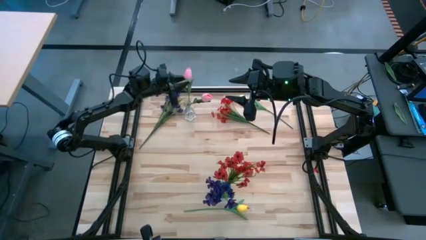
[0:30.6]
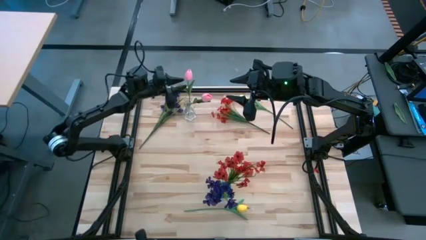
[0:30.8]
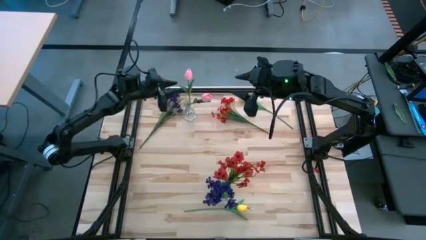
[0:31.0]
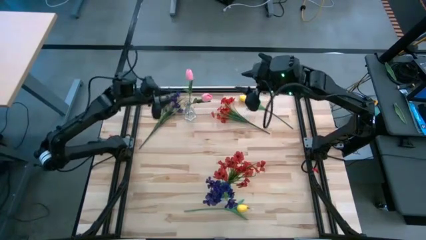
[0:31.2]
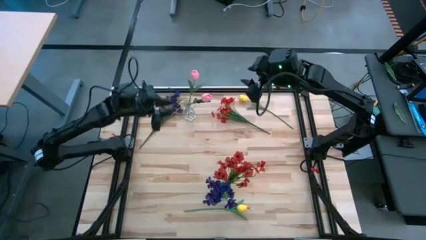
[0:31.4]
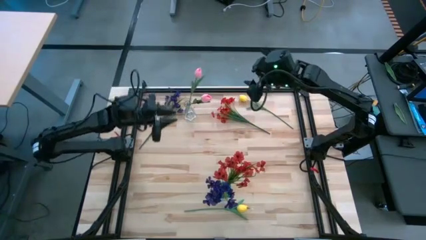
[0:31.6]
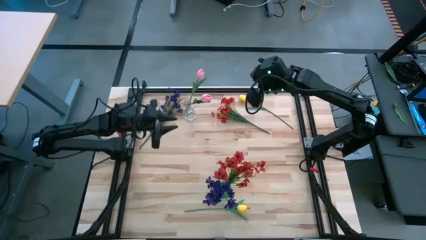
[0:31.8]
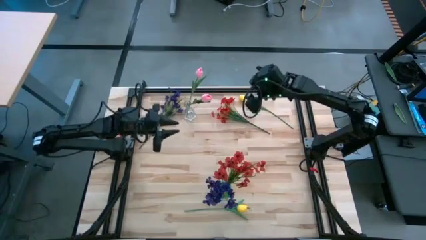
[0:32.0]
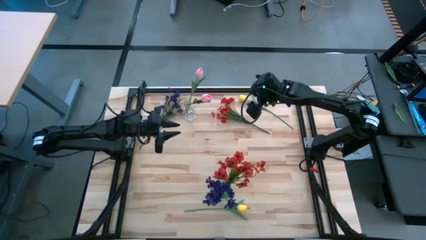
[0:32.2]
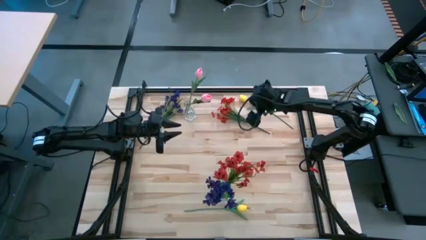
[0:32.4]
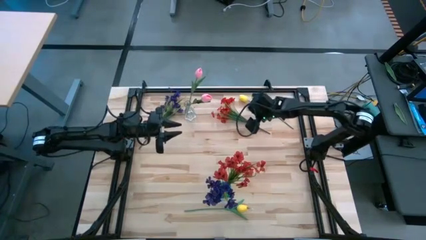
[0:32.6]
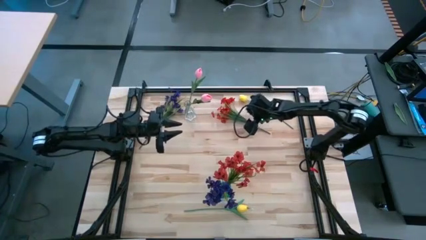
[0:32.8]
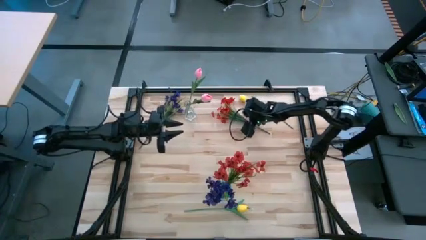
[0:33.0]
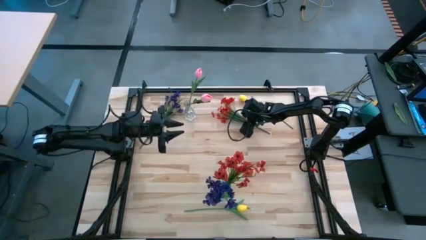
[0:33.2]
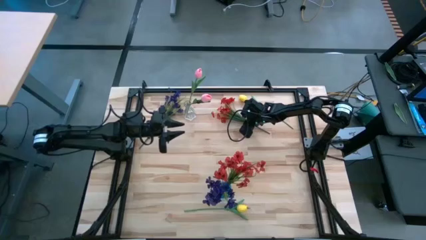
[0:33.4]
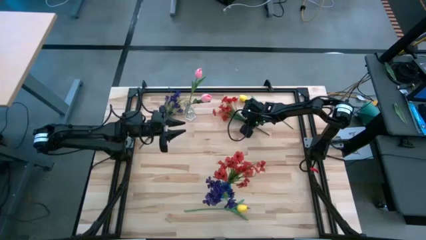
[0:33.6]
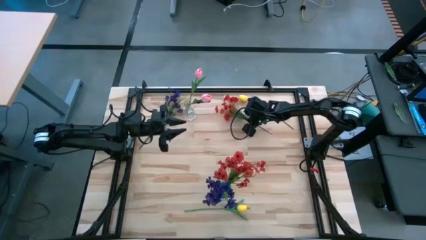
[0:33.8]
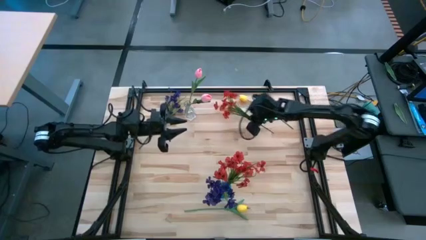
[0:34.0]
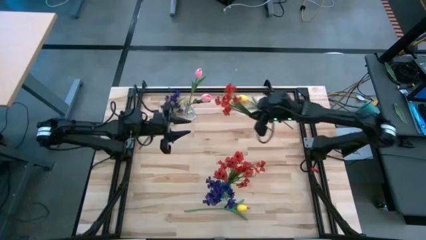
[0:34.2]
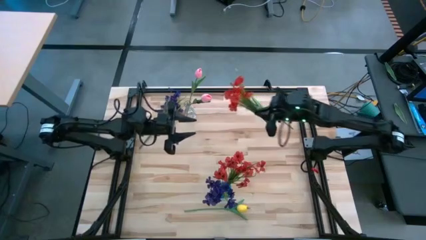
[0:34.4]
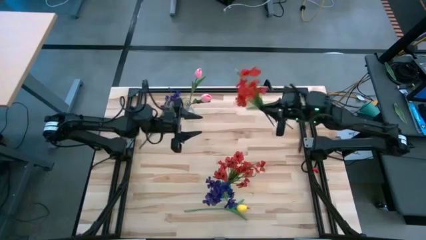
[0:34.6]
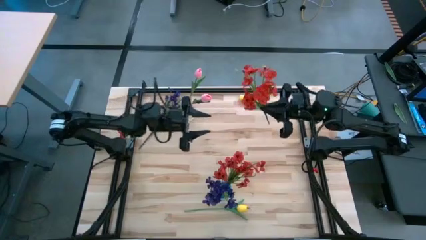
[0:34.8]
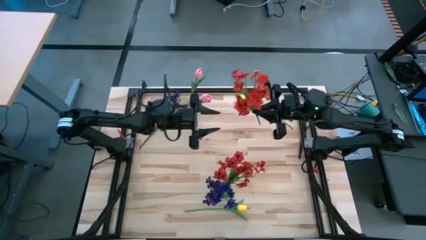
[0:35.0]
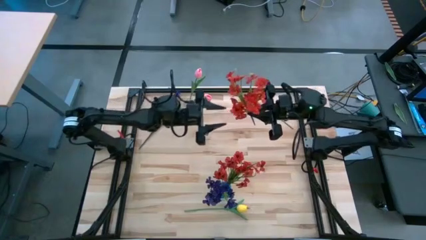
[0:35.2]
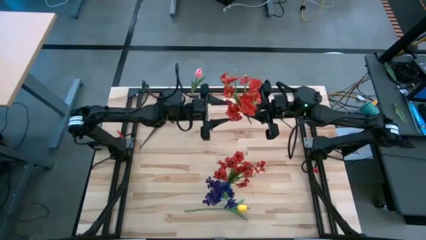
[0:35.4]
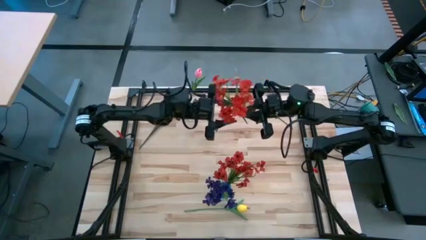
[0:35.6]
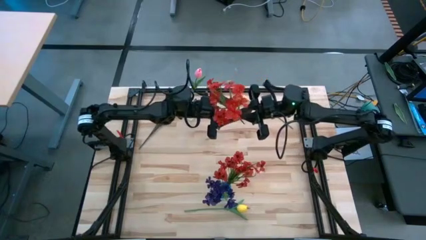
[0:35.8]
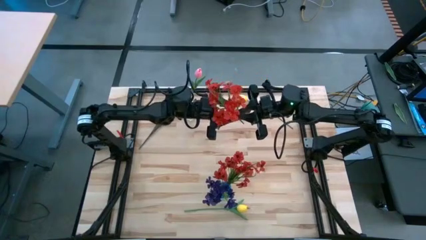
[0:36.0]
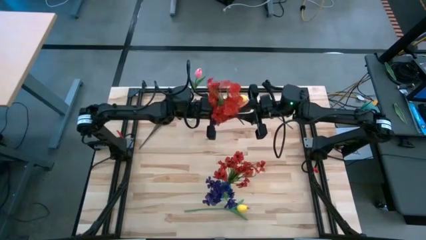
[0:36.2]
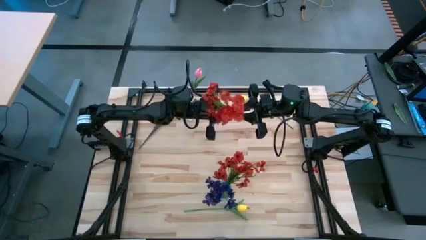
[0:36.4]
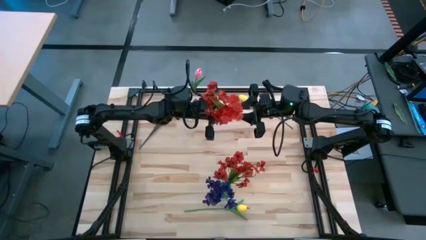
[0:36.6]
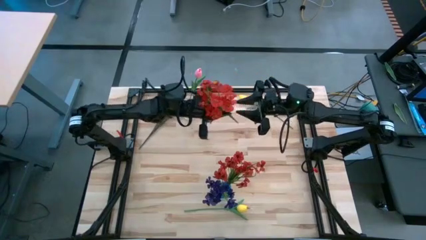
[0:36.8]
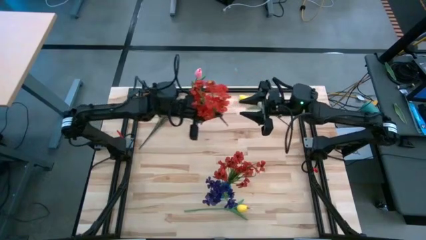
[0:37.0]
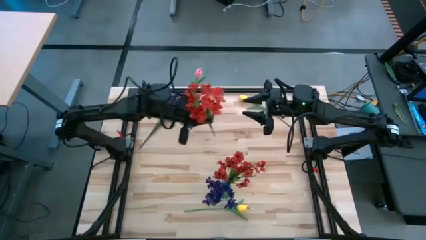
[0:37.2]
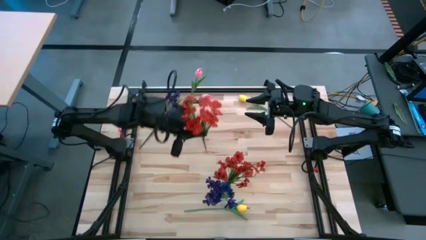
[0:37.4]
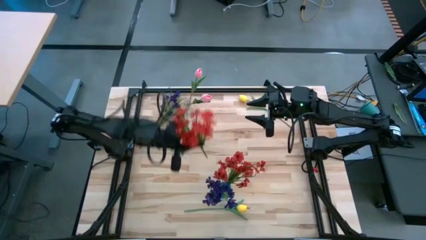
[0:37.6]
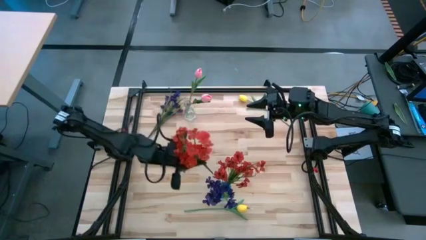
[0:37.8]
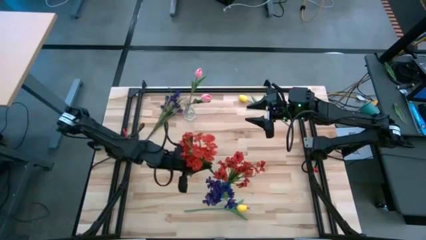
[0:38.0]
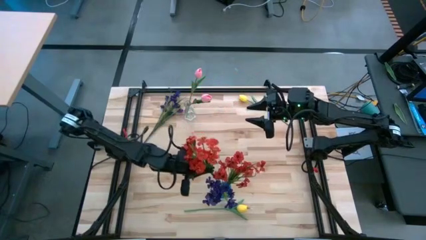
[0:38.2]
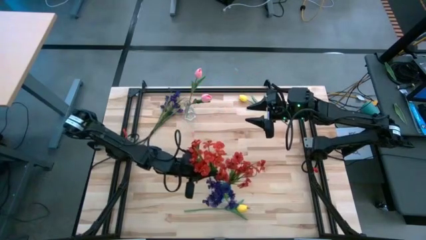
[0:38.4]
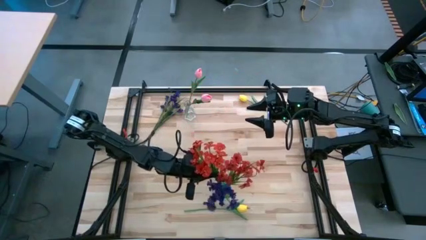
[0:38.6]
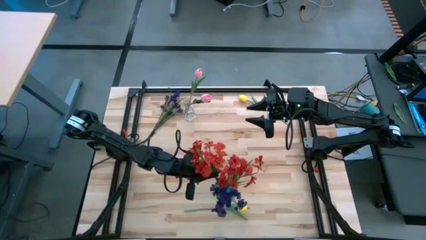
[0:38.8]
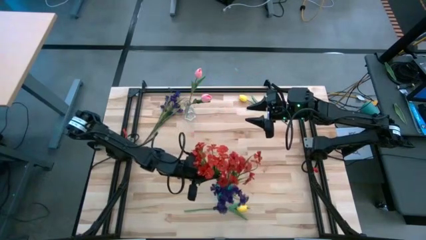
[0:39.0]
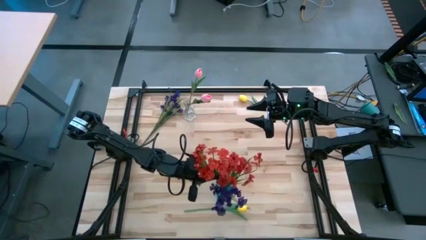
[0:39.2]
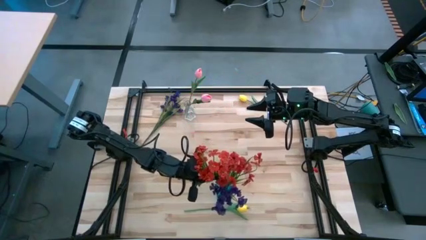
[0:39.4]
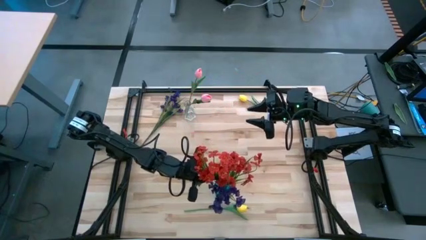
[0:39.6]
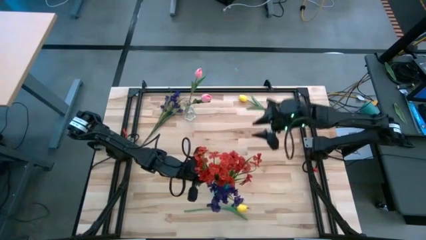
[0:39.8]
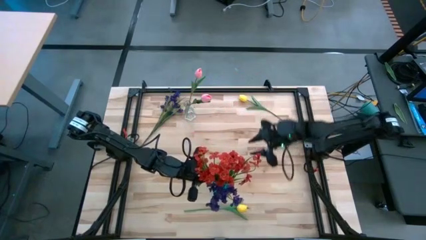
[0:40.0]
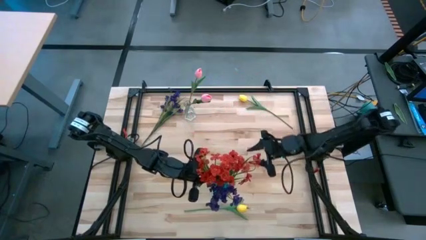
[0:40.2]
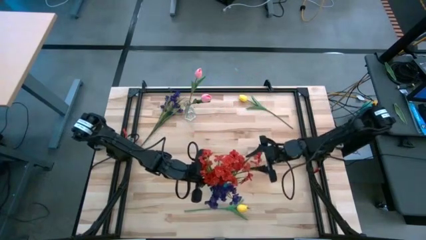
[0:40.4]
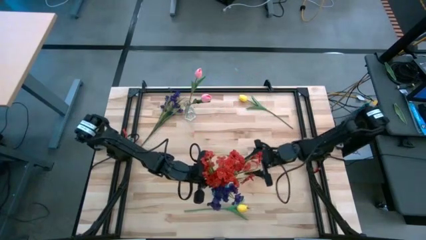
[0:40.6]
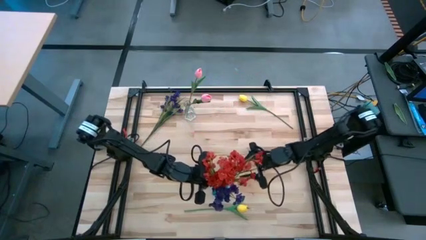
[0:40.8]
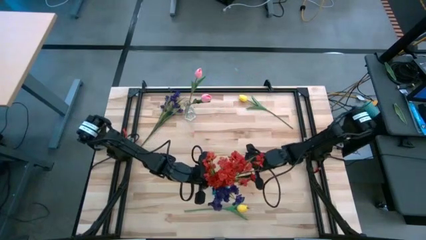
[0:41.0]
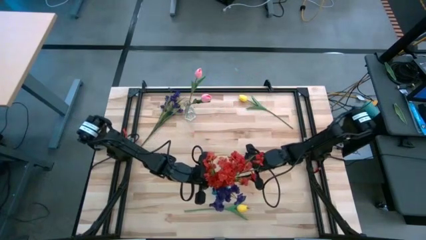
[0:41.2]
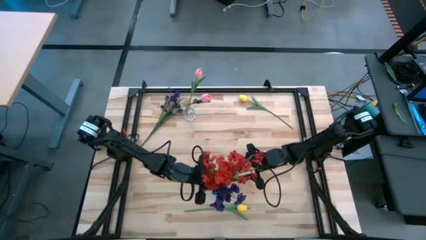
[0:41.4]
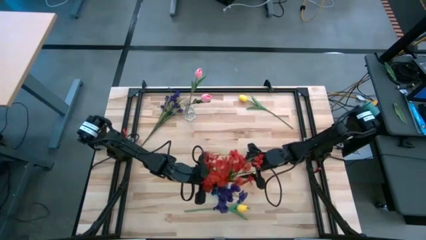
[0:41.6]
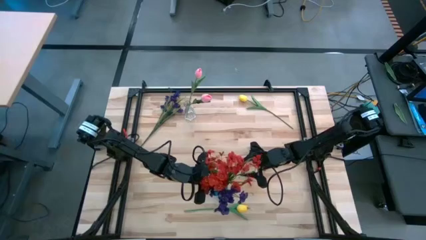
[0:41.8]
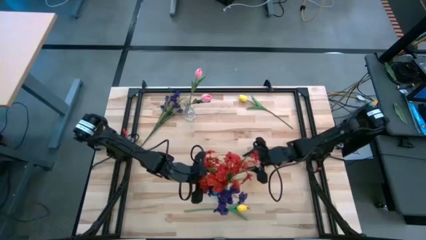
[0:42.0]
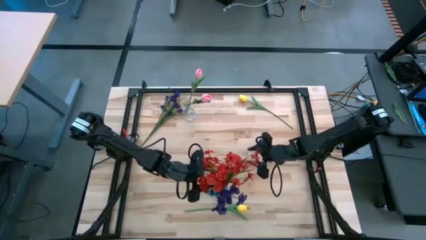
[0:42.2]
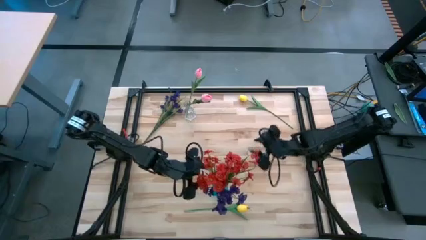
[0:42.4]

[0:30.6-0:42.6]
Task: Sort flowers into vase by color
Put the red flowers into the blue vase

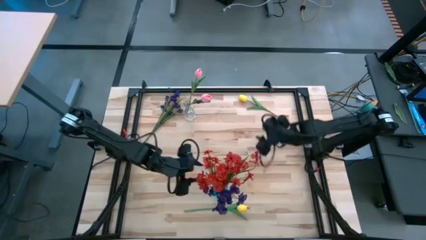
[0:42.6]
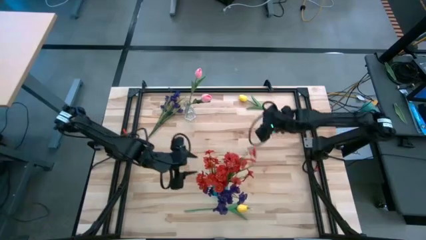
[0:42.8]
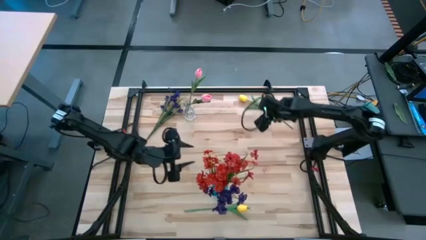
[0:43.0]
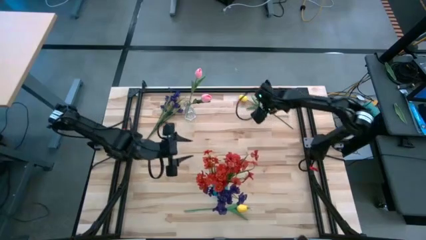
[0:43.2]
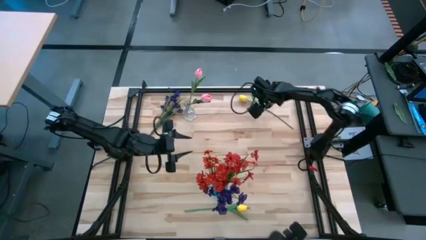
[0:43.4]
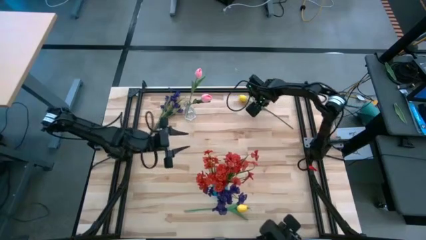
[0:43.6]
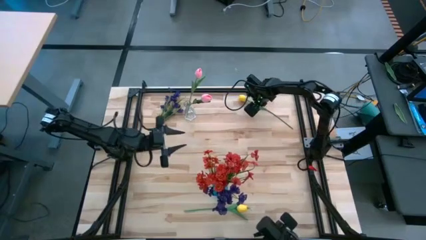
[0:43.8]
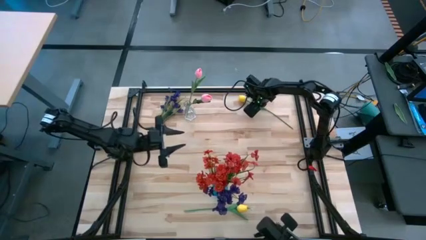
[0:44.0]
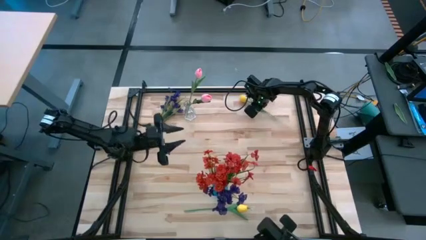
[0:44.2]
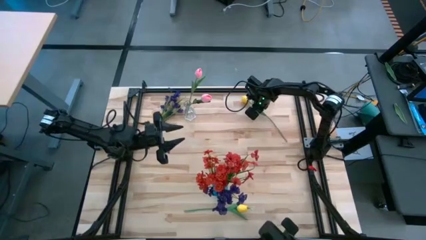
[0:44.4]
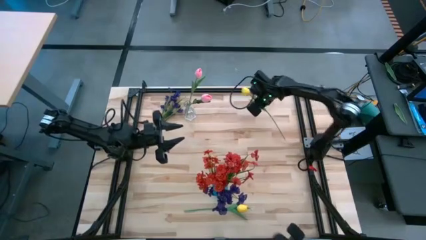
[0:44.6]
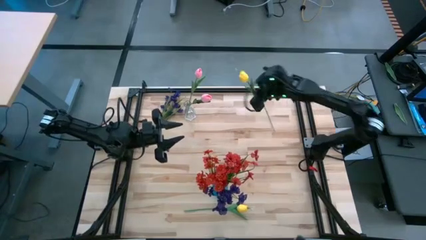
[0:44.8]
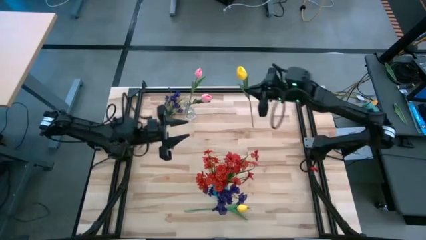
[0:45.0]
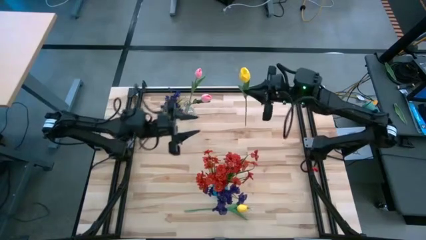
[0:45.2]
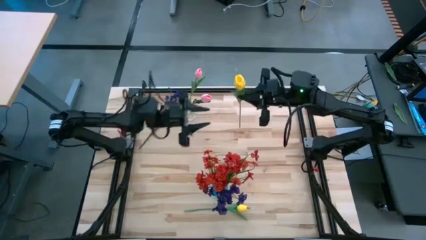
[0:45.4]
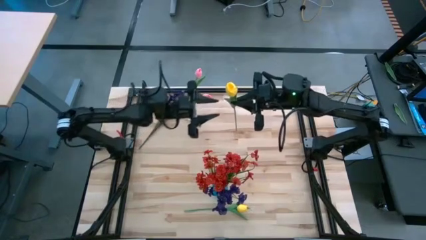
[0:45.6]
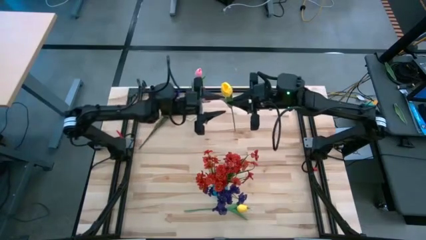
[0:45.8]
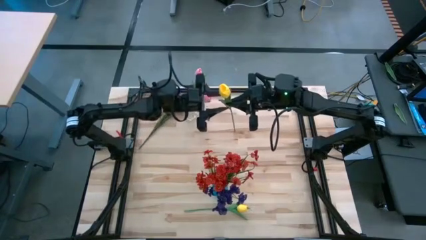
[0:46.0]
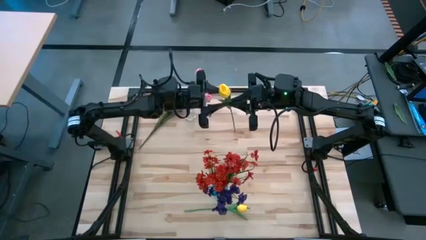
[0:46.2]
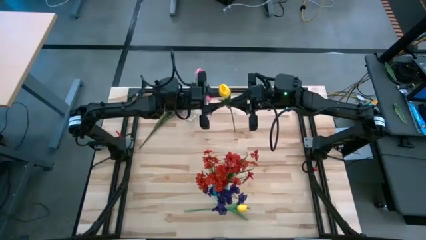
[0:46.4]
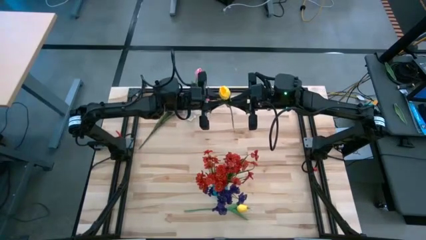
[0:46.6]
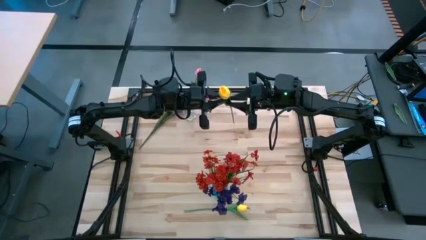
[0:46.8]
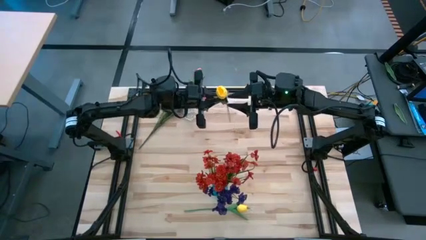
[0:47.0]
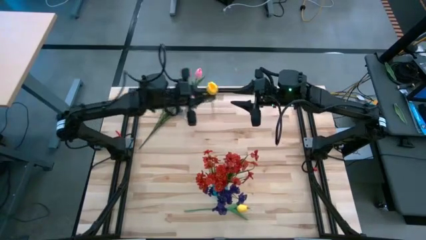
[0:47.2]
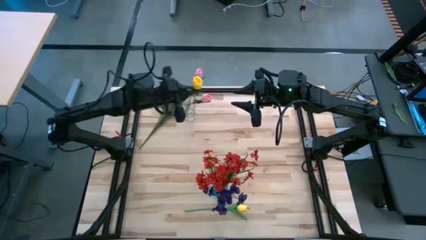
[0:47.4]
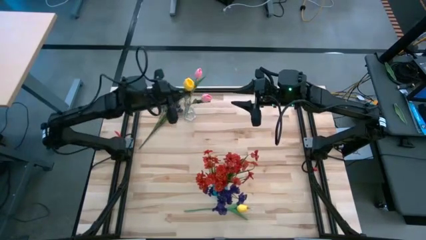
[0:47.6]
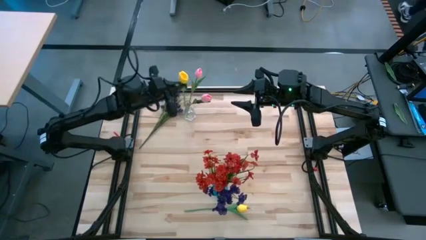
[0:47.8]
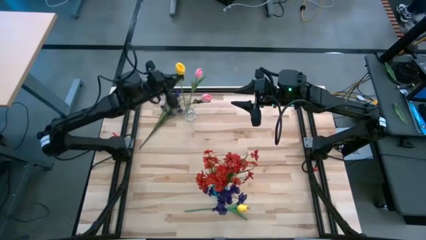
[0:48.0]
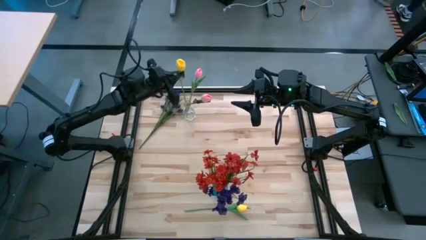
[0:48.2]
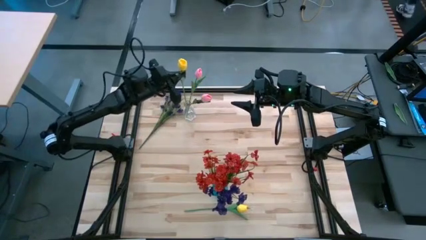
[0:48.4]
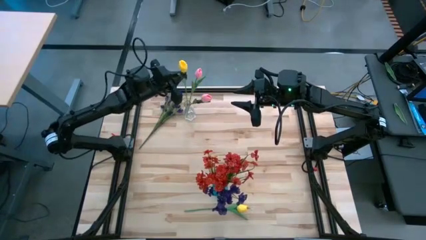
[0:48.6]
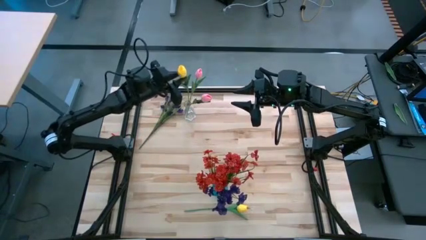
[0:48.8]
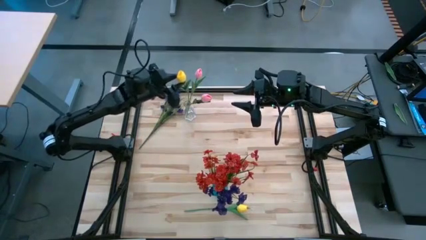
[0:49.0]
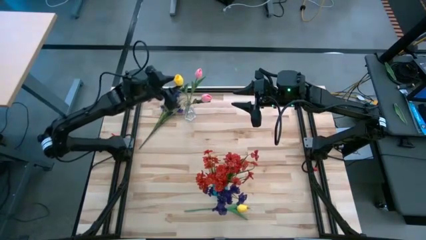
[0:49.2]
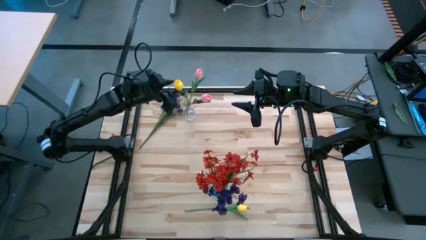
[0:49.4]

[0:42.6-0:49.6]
Put the top yellow flower into the transparent vase
